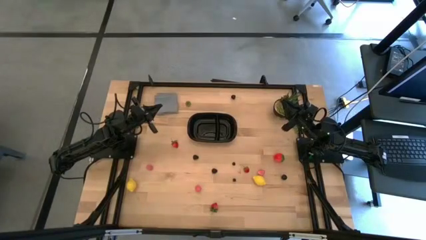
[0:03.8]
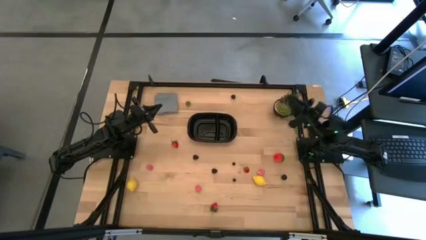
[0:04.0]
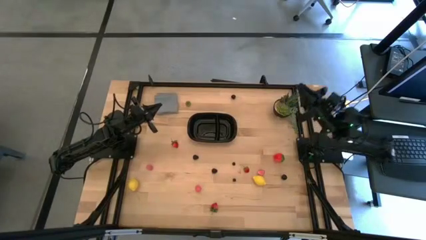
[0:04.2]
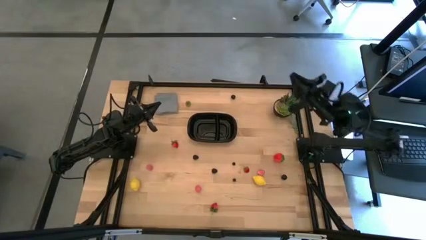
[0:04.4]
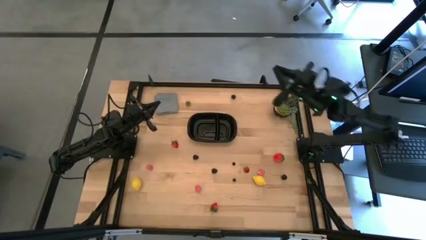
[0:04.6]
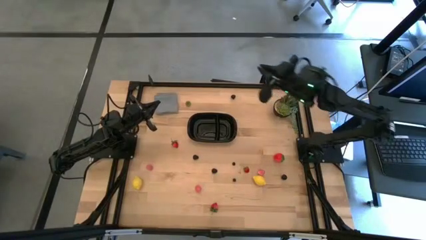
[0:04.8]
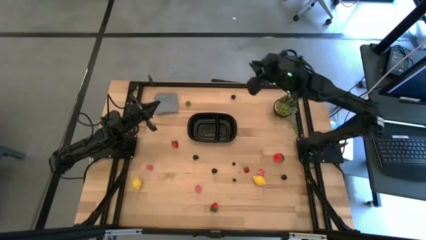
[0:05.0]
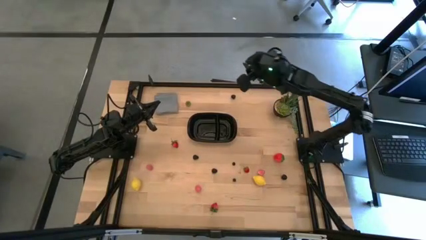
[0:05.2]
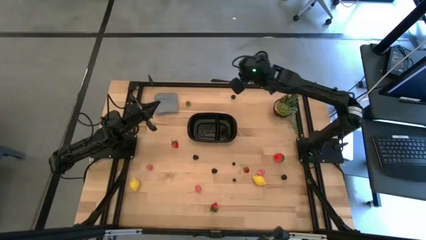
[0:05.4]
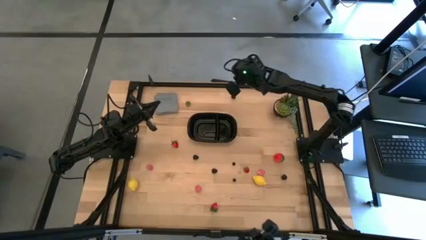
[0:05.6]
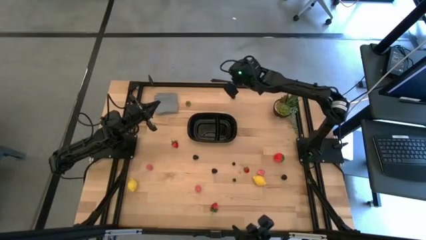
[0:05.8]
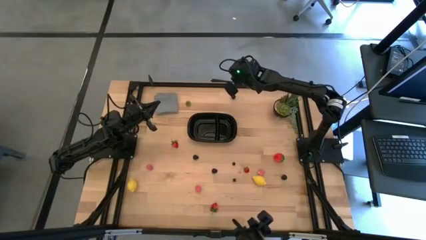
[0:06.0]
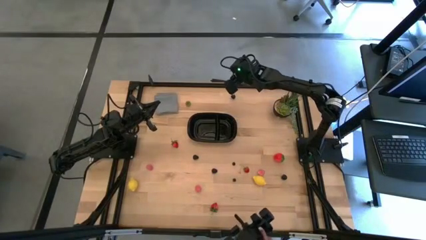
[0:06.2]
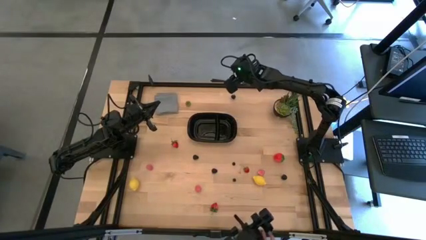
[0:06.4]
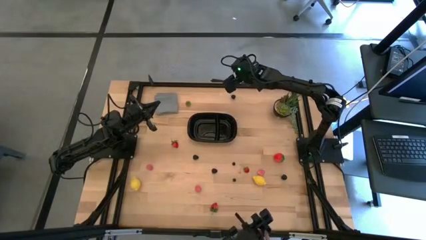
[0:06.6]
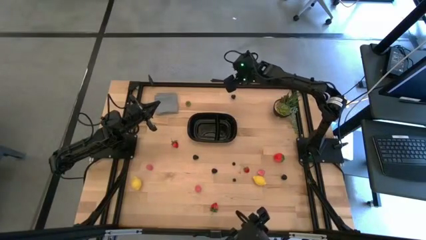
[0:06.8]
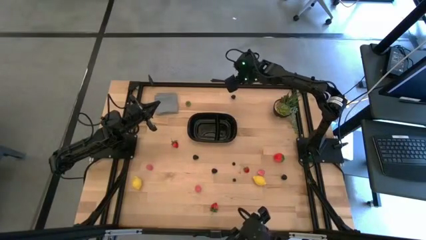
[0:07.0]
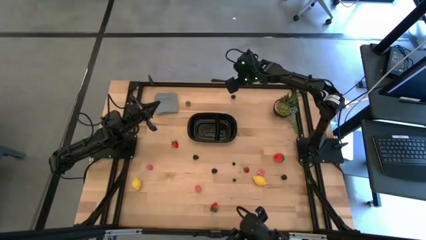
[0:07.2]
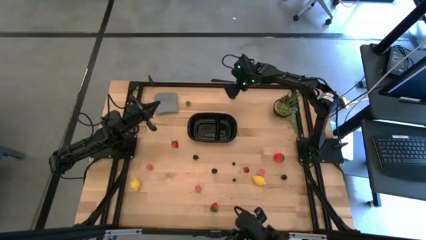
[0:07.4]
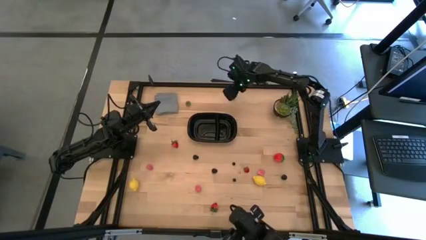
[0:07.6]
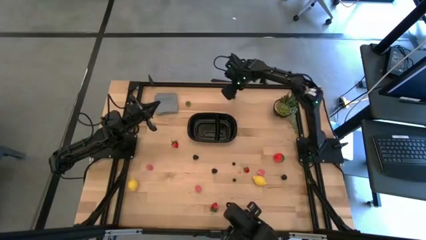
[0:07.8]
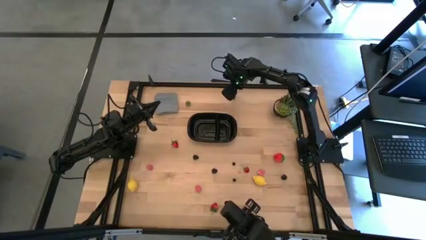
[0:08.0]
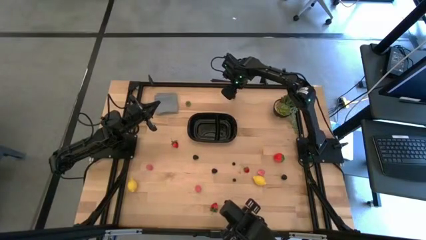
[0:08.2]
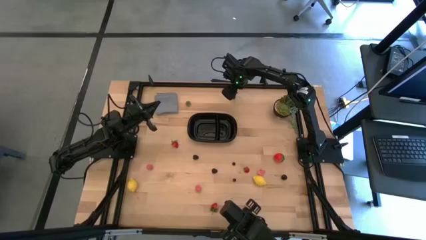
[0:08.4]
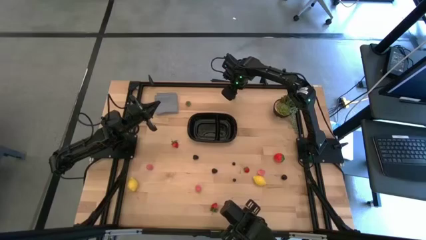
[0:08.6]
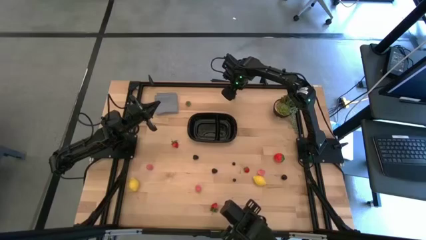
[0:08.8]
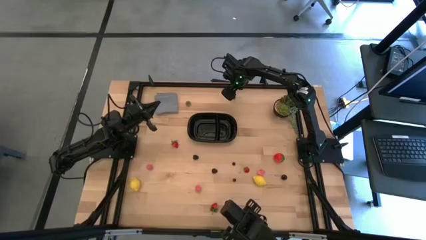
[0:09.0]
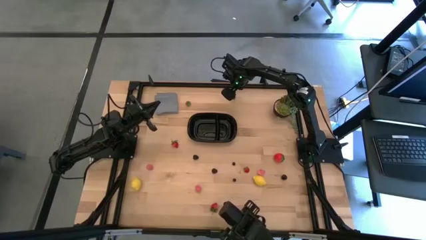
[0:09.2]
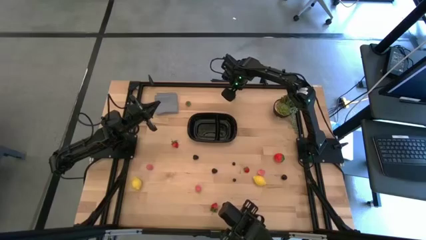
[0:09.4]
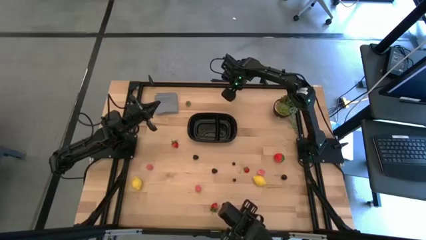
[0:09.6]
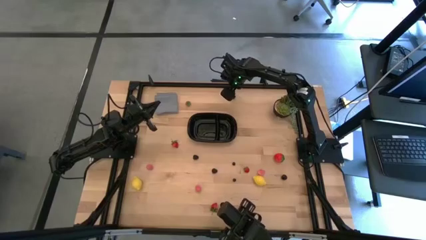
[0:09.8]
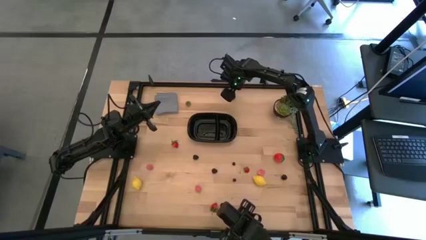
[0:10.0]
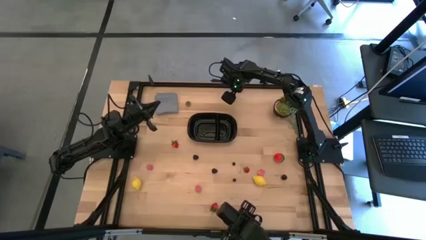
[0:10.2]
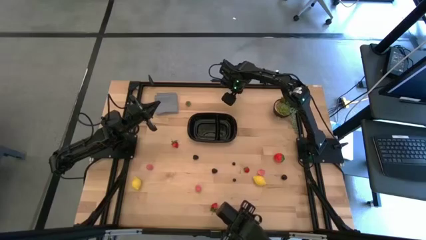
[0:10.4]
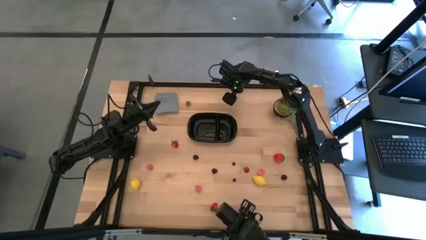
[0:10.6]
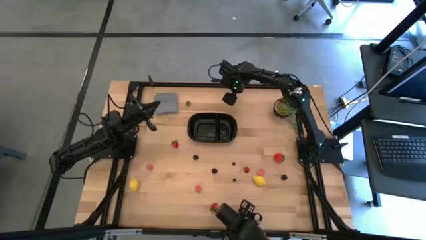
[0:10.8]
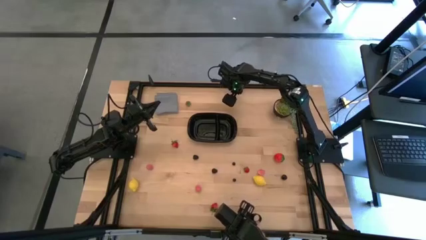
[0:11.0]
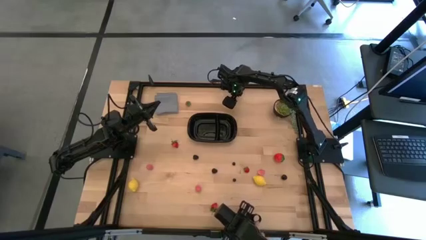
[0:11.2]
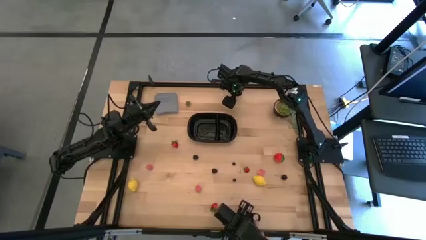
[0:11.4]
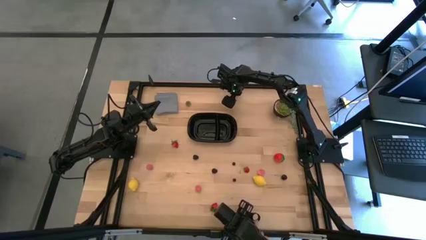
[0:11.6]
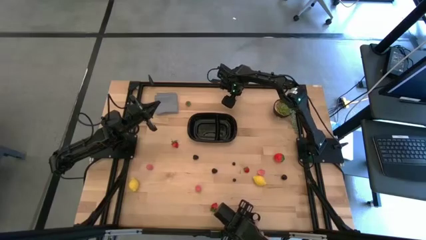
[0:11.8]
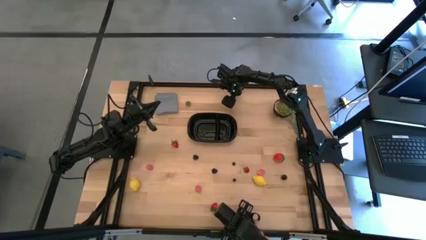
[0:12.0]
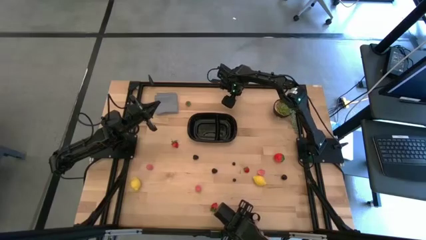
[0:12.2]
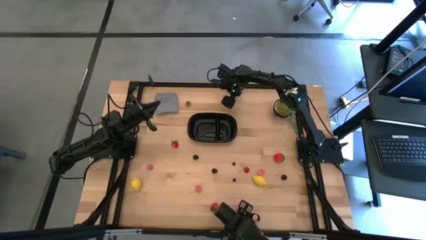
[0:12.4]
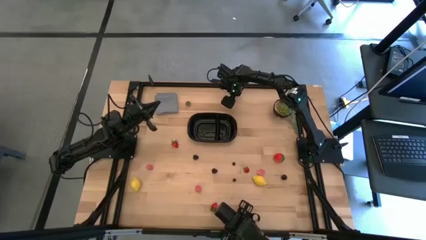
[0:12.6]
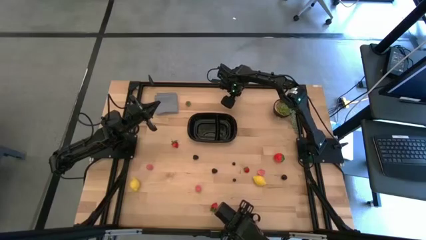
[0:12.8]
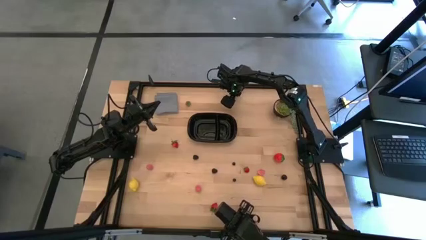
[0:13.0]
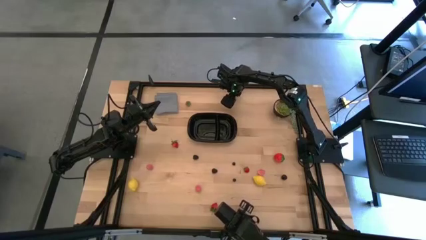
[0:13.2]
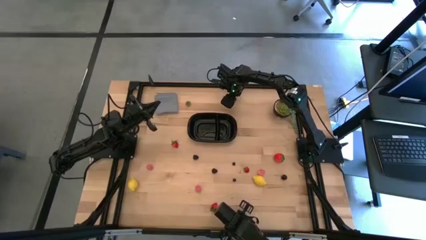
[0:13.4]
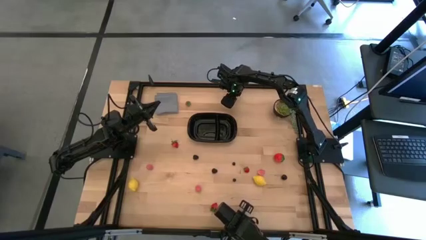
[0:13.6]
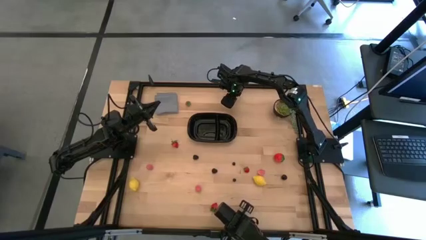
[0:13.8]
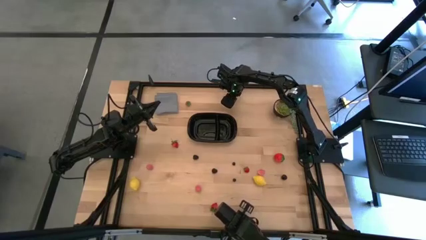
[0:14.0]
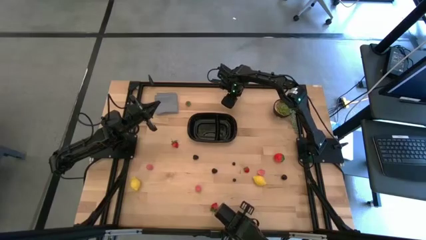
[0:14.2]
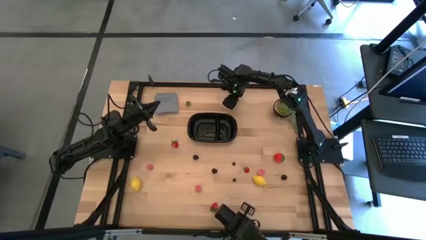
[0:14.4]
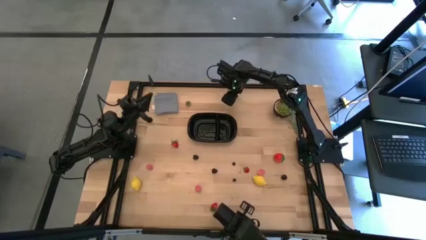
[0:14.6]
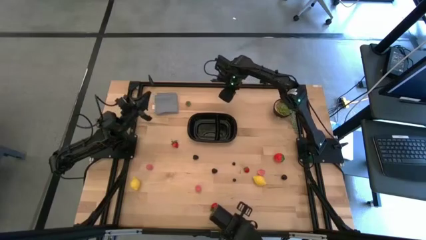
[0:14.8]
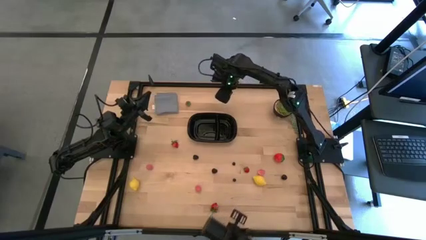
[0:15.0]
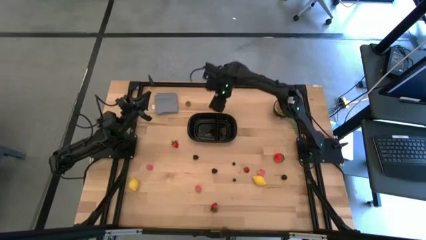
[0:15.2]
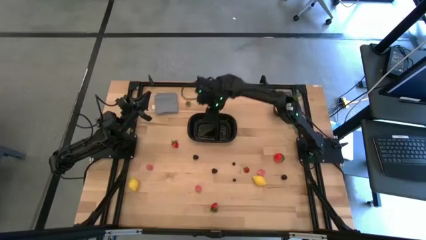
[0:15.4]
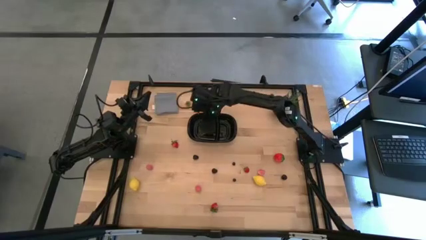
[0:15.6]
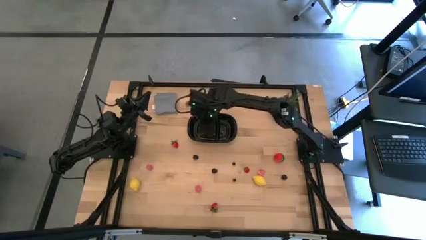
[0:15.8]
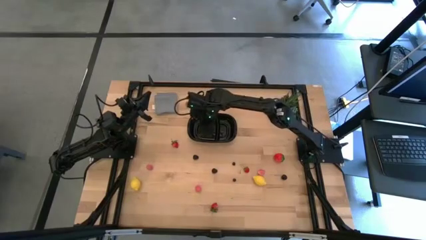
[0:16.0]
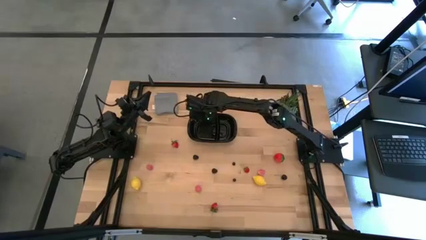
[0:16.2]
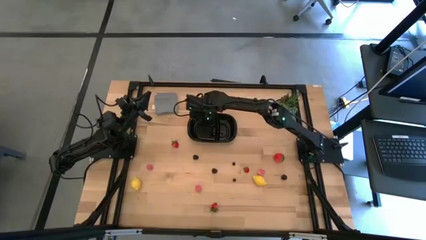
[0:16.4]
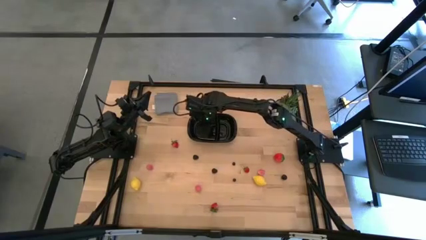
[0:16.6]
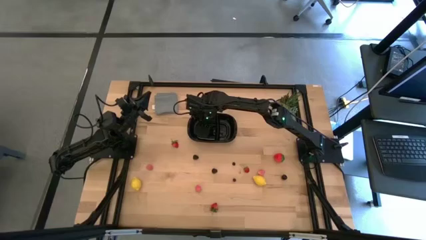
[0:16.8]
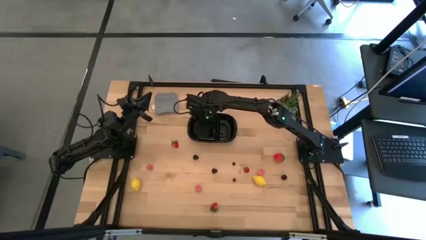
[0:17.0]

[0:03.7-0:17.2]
Task: Pick and placing Produce into tupperware
Put the top black cherry into the black container

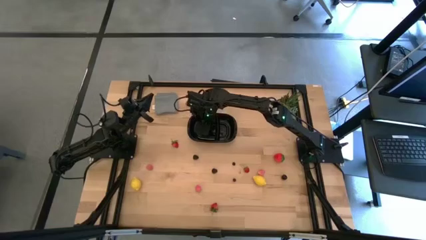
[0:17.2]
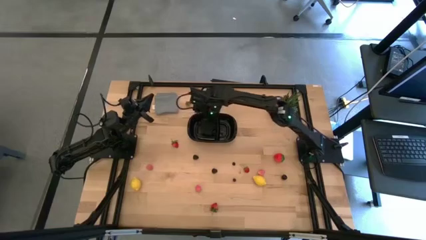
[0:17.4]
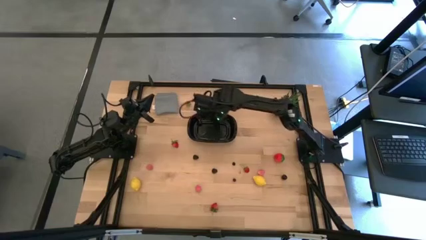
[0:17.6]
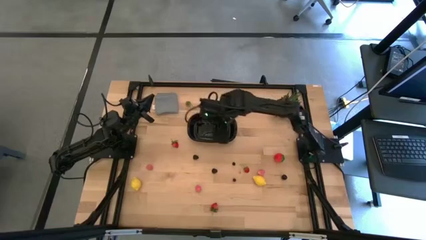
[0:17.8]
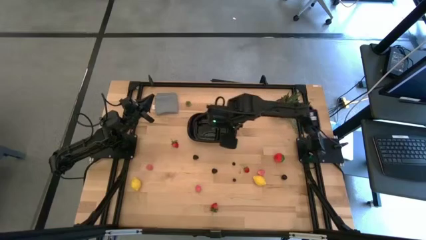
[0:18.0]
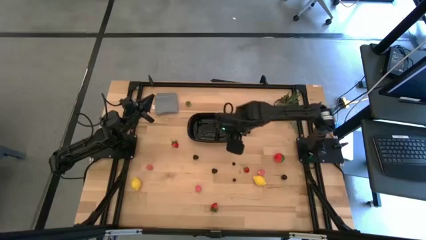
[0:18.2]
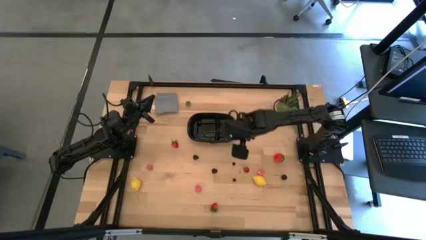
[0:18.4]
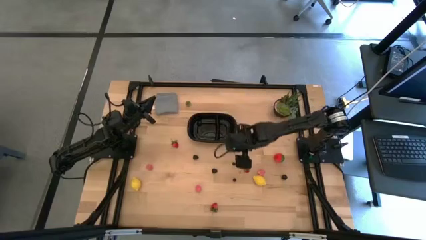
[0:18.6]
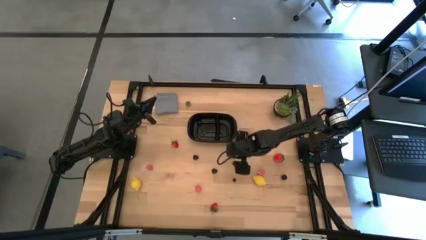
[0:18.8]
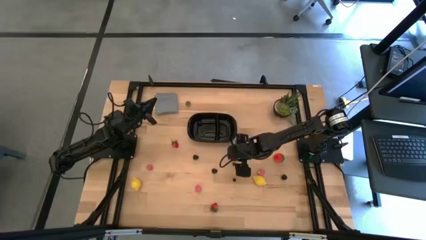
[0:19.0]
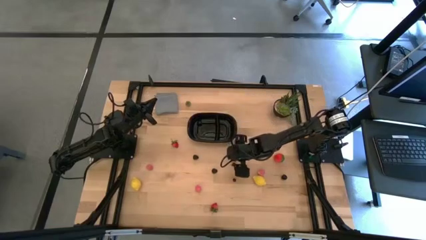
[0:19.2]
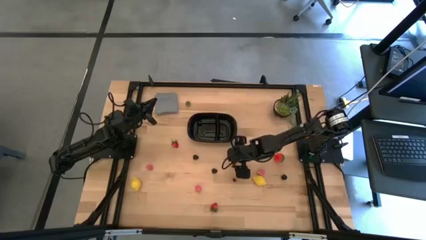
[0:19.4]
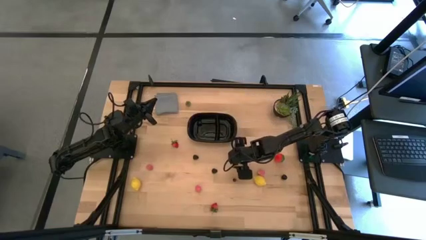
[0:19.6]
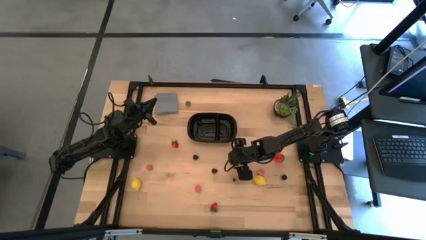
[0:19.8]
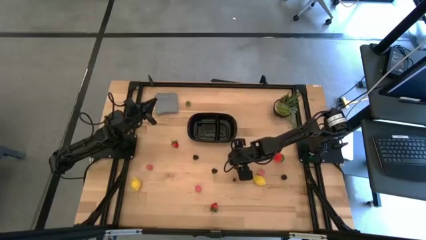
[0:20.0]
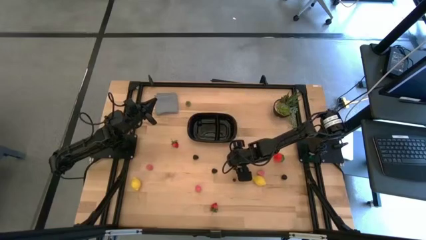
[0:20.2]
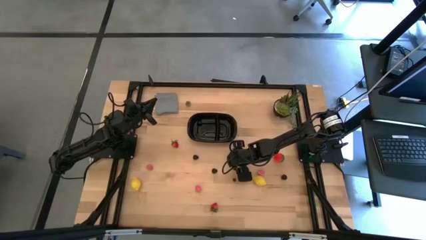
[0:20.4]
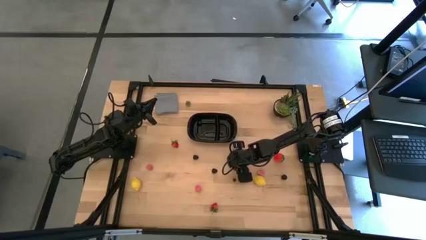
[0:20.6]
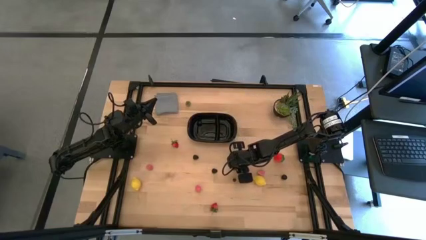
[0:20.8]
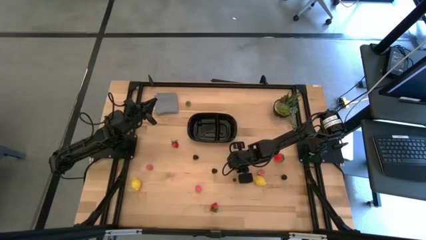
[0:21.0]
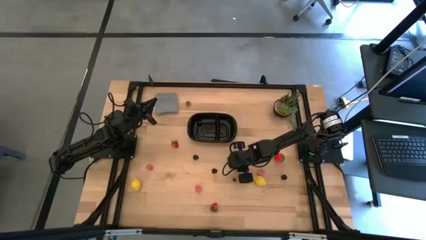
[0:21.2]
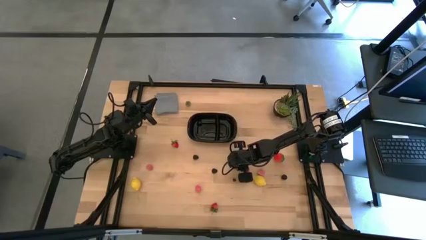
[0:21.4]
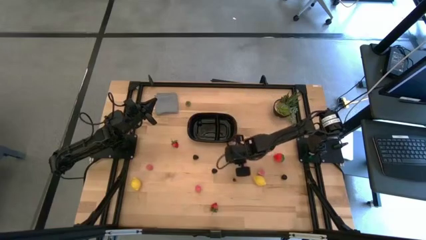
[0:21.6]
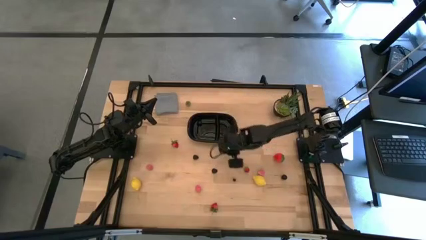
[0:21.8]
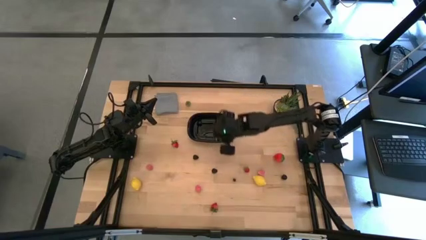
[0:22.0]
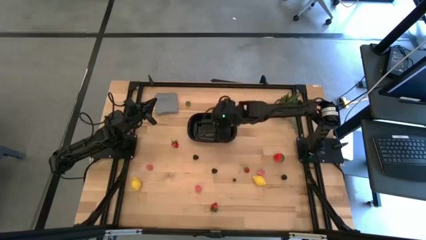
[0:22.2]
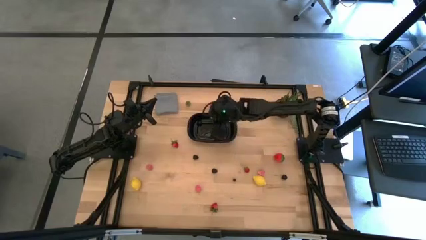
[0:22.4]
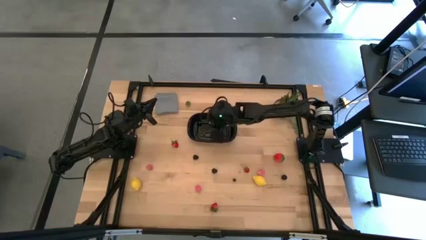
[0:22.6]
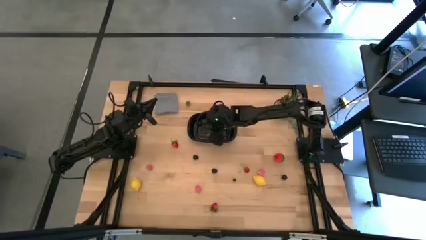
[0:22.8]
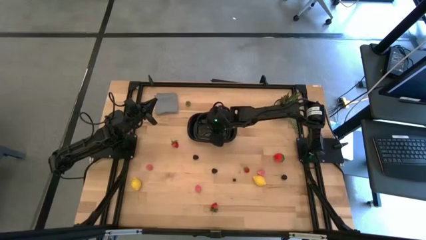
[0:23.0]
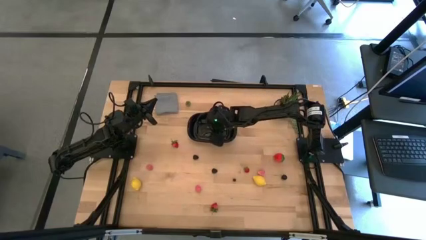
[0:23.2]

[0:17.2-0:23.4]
Put the right blueberry into the black container
